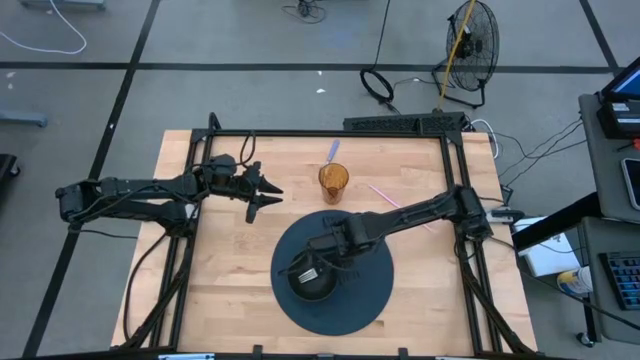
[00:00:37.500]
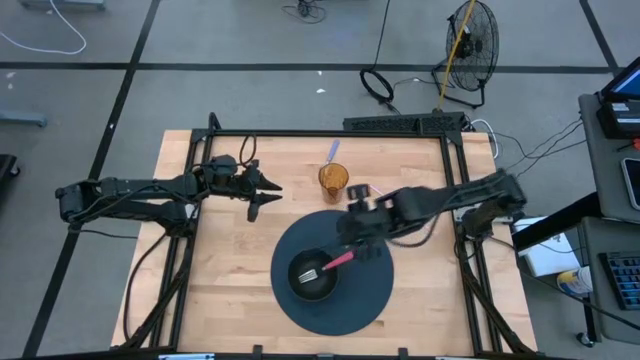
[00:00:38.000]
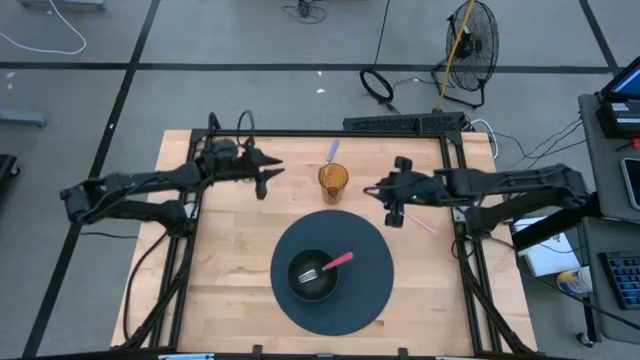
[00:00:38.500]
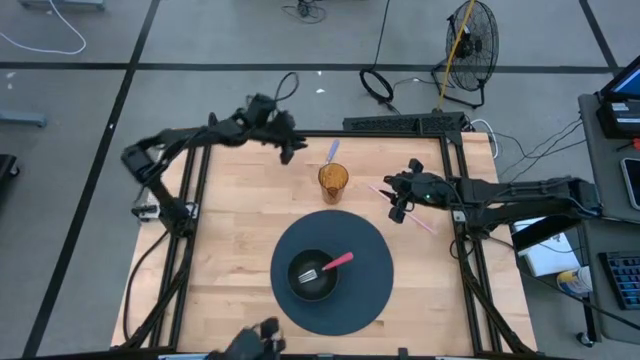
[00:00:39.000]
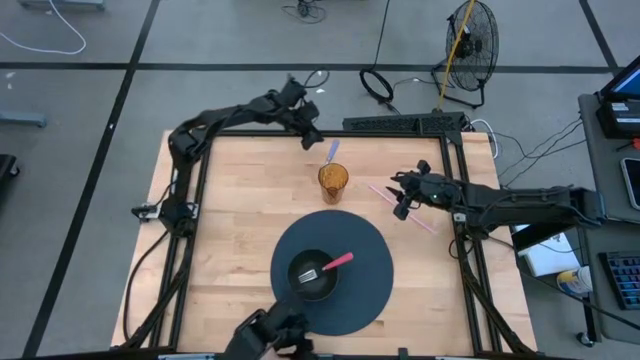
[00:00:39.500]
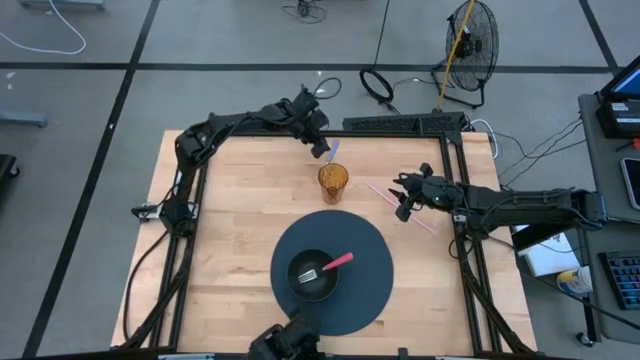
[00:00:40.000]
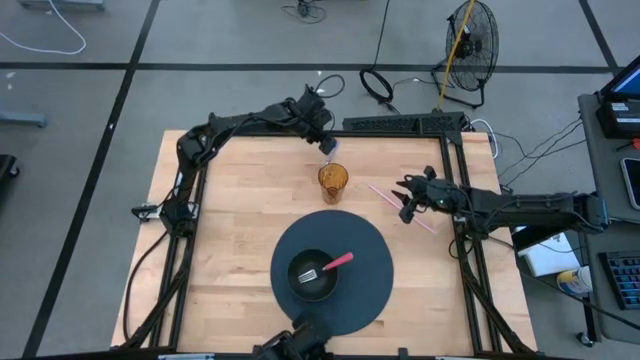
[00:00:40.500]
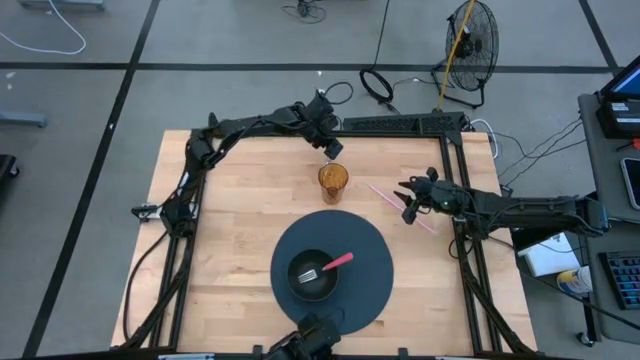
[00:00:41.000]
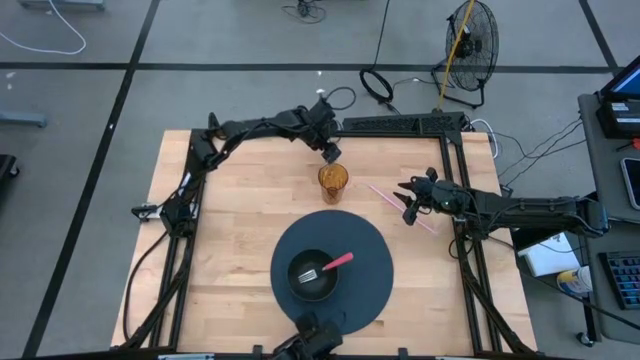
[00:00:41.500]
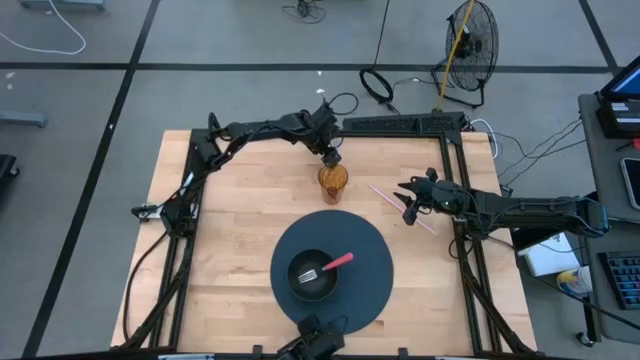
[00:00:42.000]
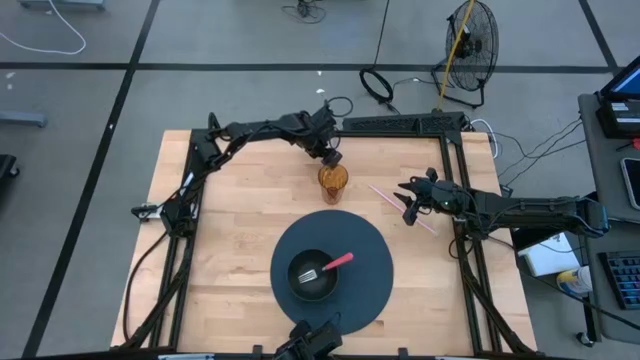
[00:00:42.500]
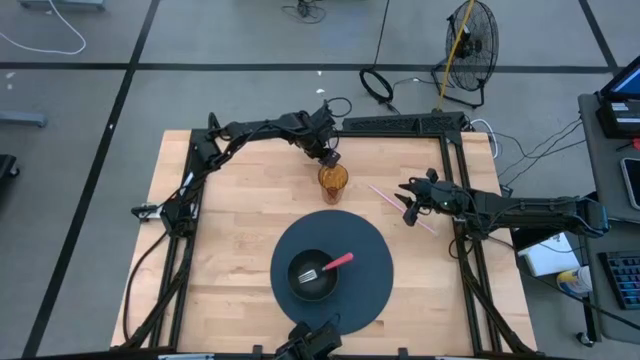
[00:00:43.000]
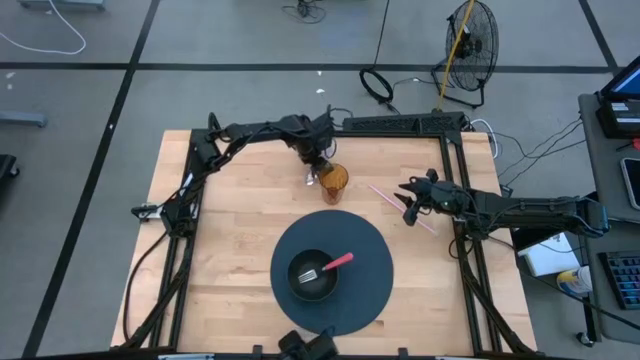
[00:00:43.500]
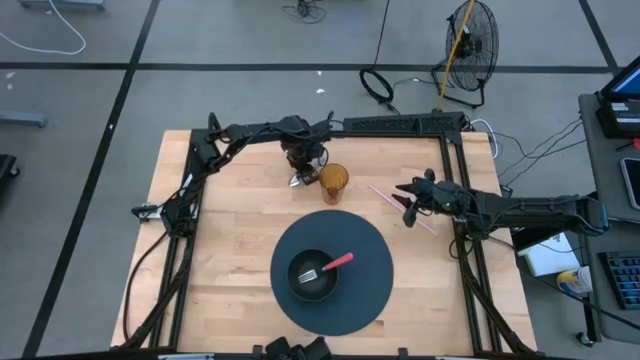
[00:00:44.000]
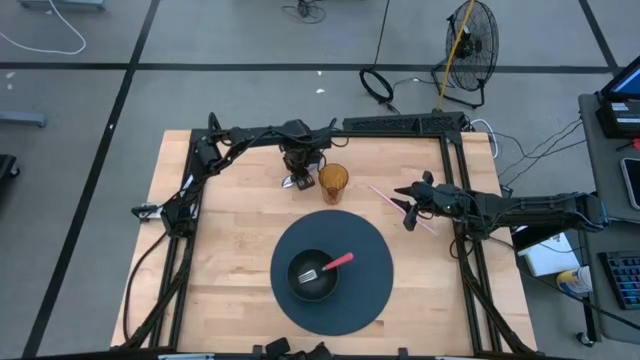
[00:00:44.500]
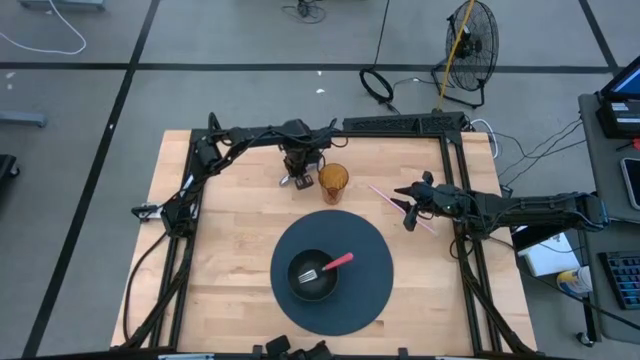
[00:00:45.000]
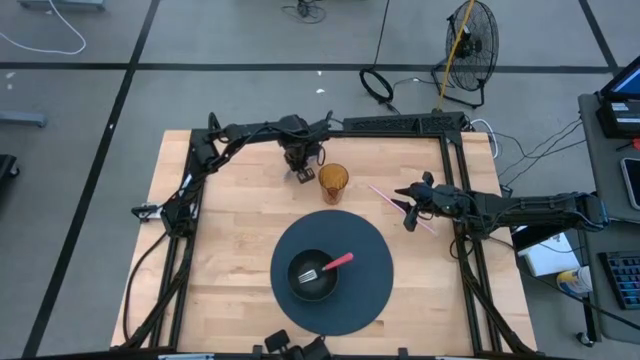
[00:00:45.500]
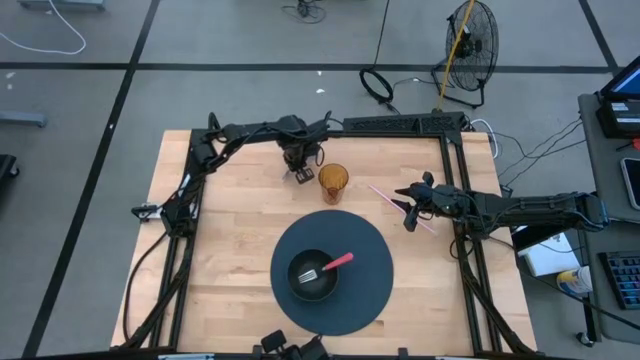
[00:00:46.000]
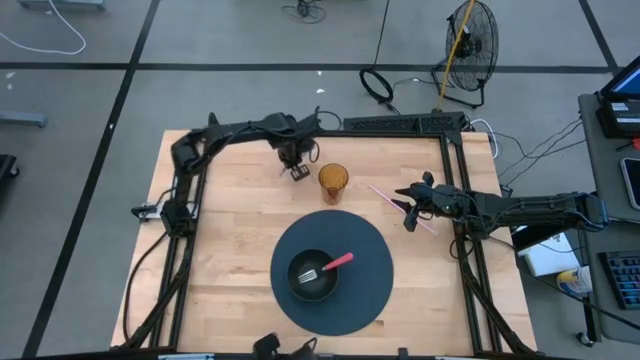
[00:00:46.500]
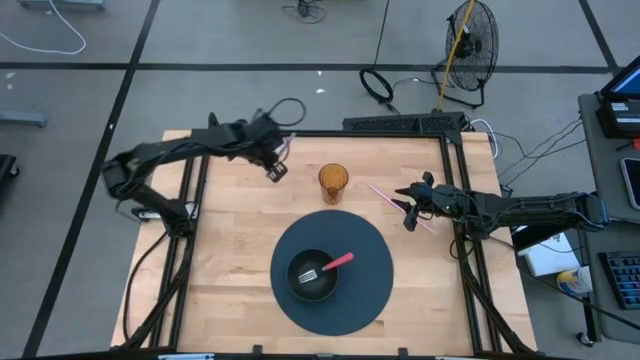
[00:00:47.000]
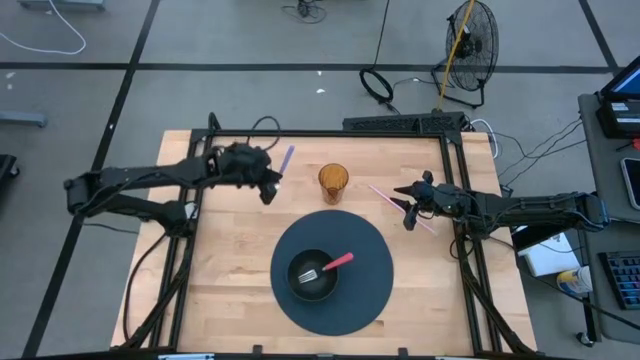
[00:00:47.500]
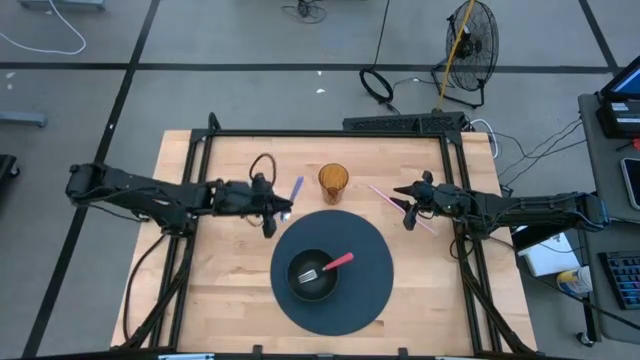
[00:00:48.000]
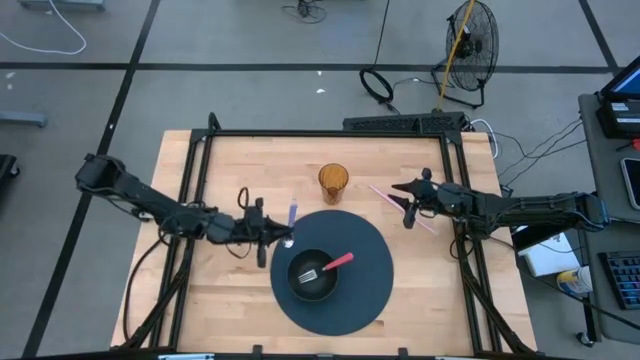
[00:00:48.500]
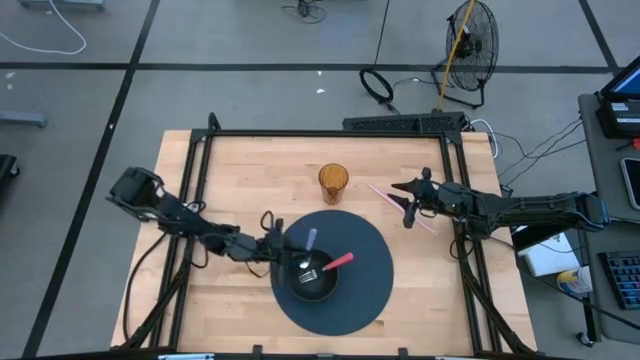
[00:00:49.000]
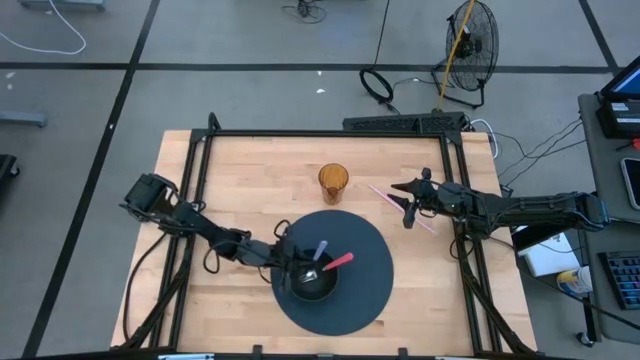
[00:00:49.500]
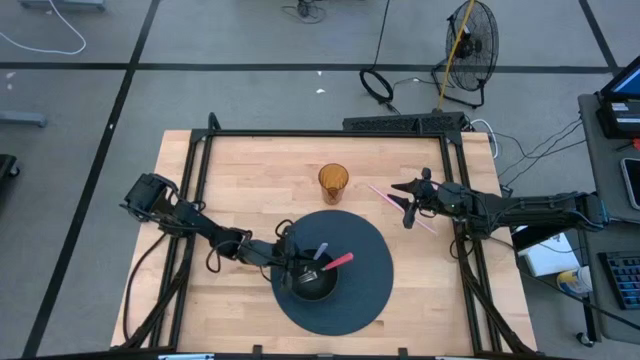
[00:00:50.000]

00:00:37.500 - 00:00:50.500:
Task: Pick & Place Utensil
Put the violet spoon into the black bowl

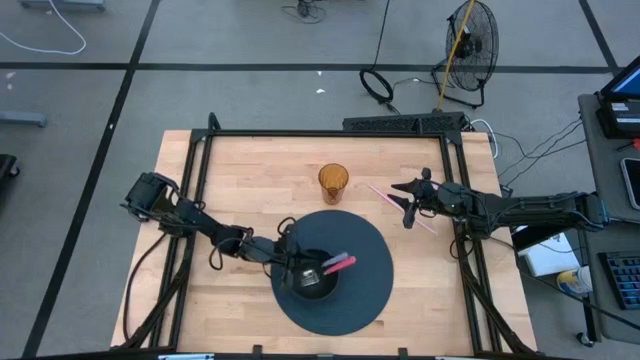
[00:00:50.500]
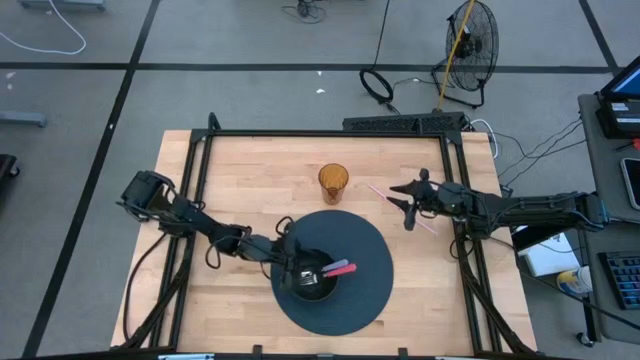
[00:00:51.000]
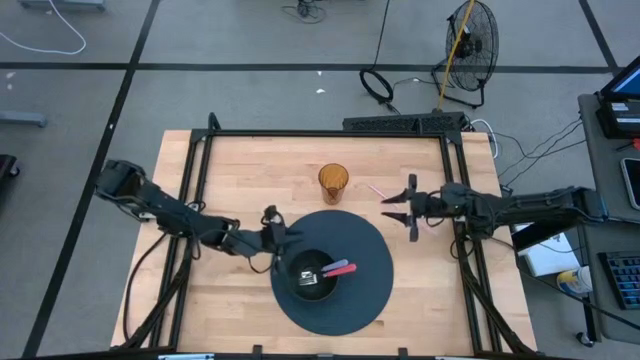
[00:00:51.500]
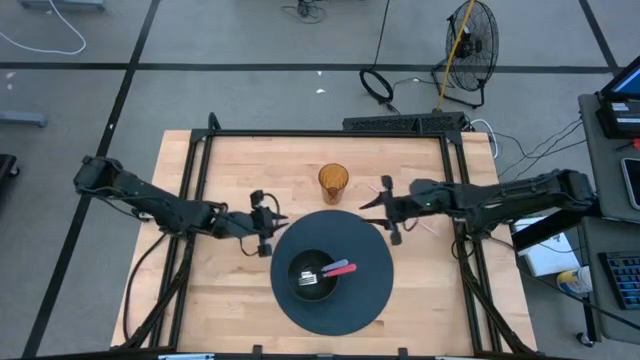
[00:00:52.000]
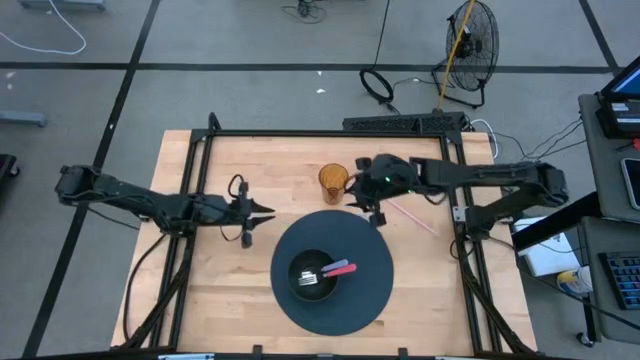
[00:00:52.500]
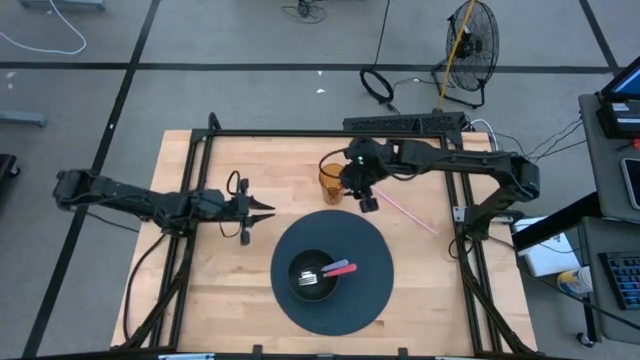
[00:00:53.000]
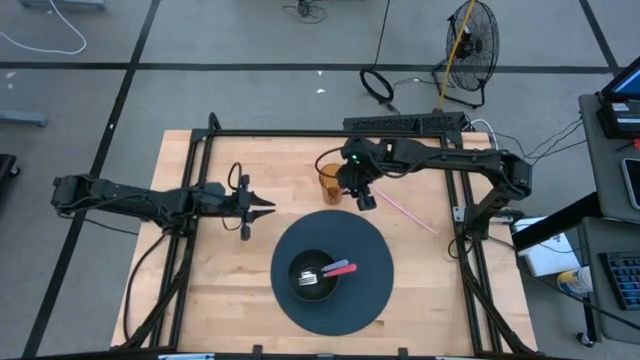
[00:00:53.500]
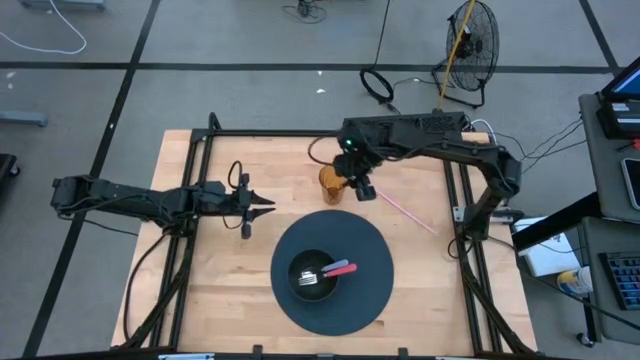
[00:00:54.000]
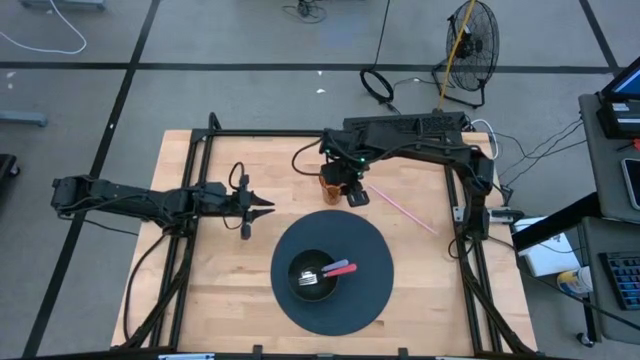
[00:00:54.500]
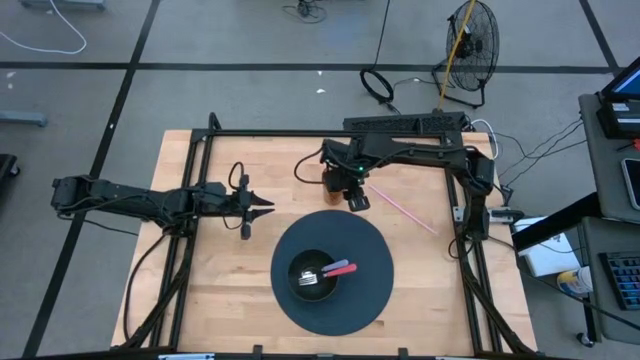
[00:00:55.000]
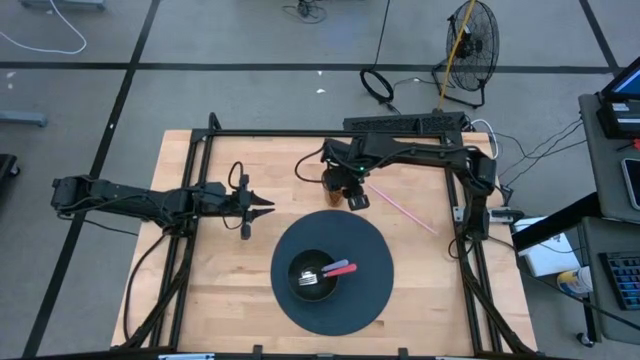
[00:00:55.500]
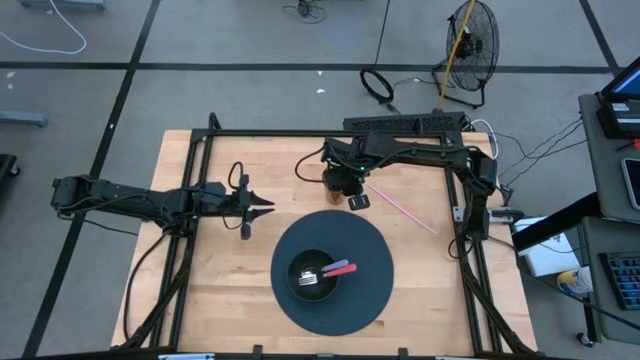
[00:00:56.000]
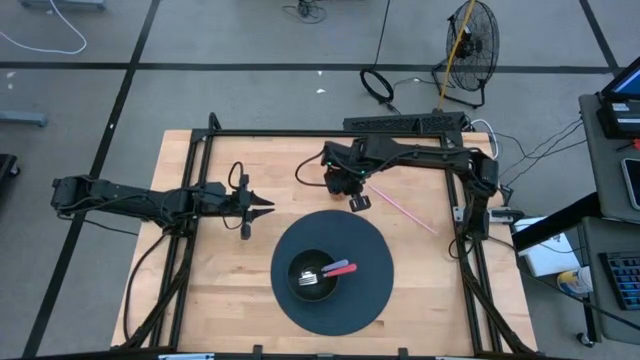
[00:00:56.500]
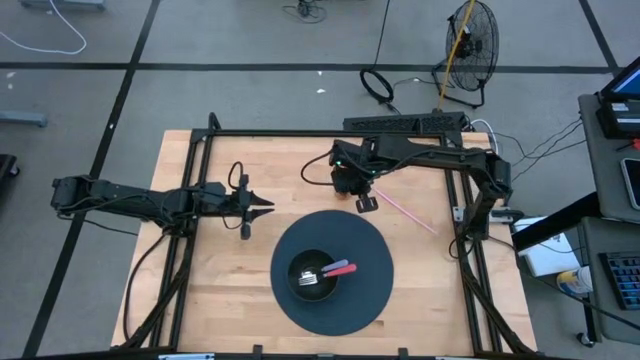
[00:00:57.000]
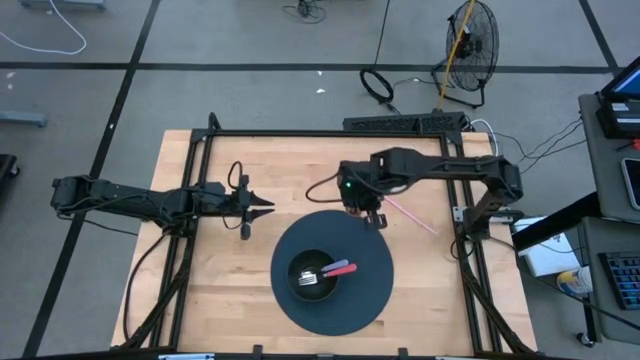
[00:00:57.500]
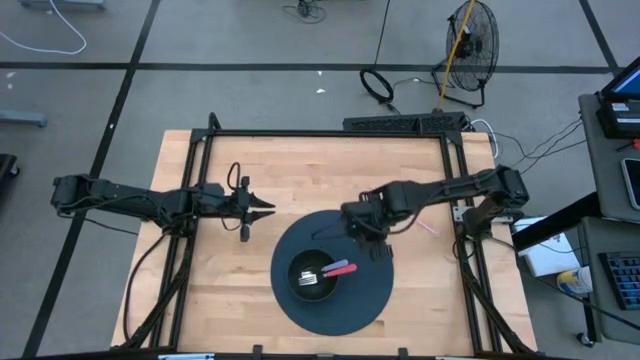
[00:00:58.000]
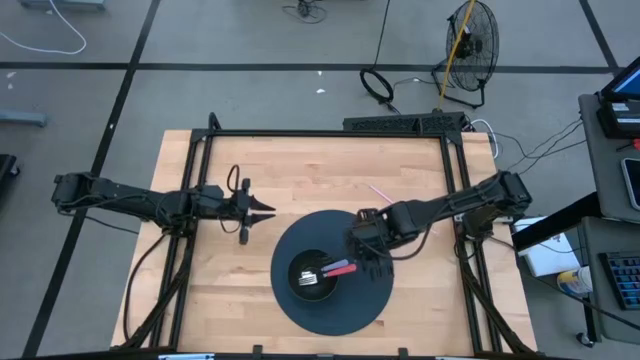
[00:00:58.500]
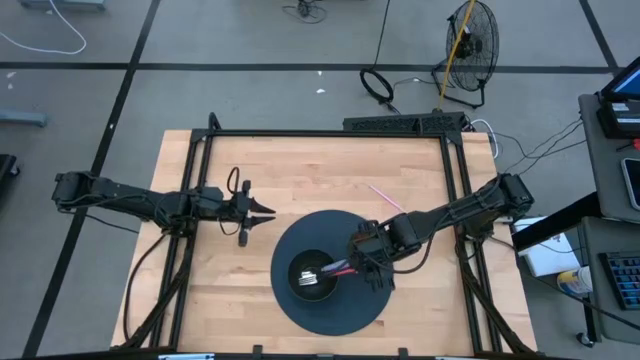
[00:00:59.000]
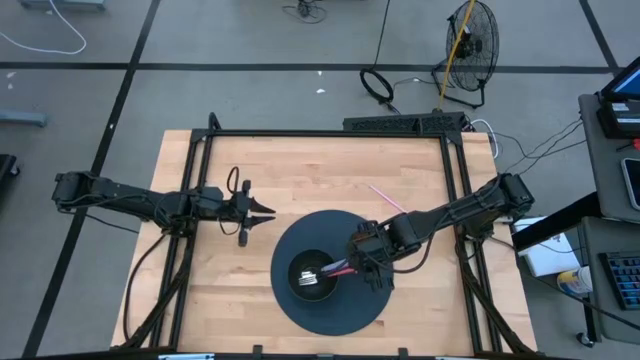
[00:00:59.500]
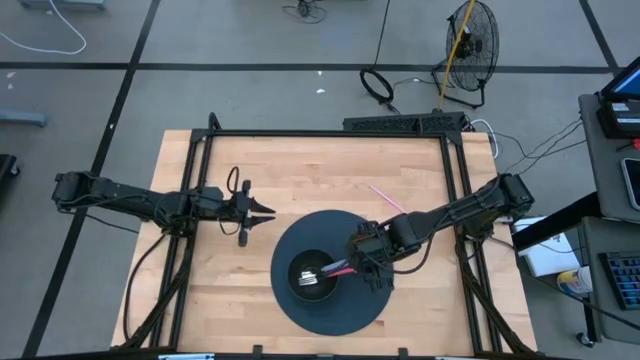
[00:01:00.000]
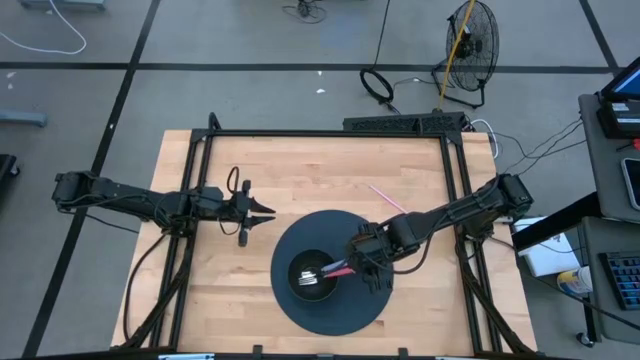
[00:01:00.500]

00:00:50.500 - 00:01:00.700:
Put the brown cup on the blue mat to the top right of the black bowl
